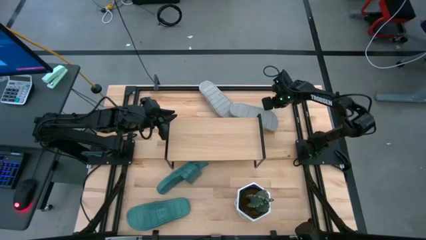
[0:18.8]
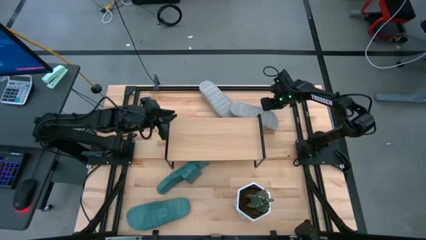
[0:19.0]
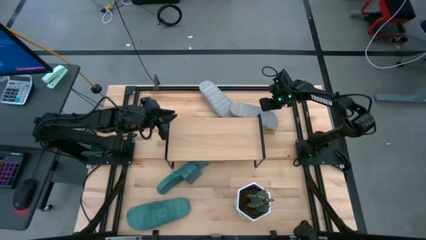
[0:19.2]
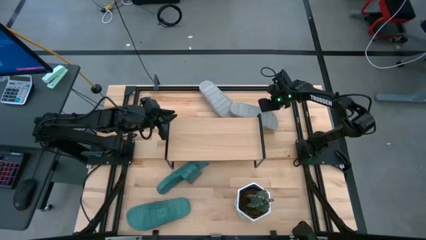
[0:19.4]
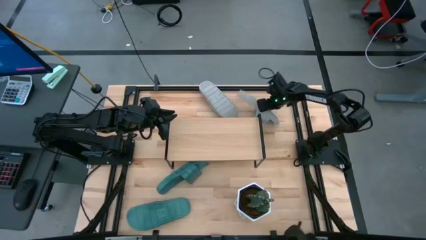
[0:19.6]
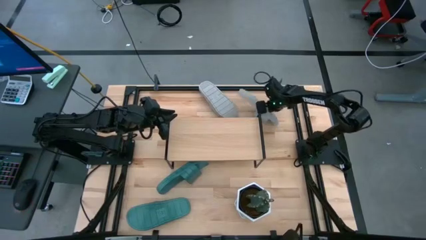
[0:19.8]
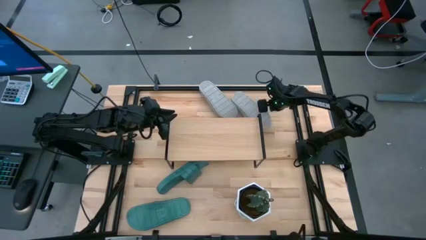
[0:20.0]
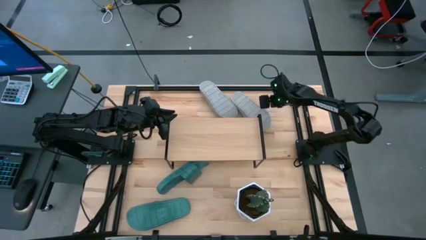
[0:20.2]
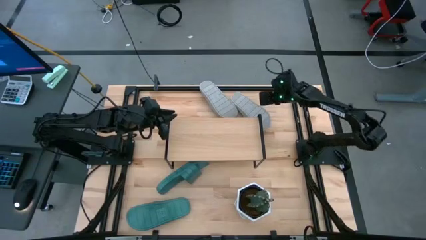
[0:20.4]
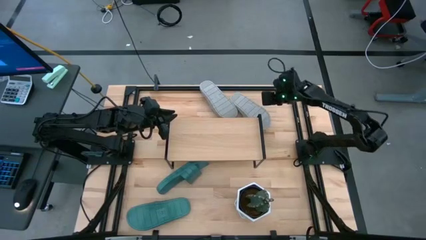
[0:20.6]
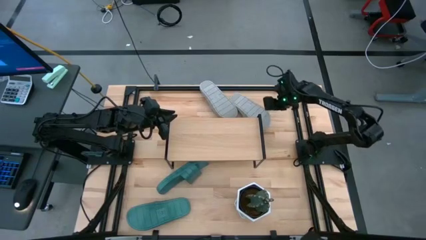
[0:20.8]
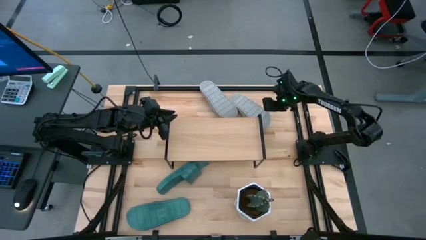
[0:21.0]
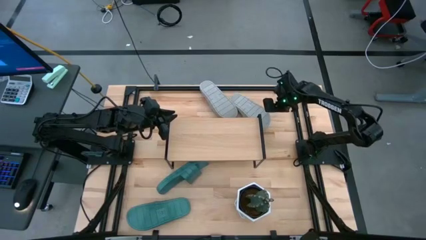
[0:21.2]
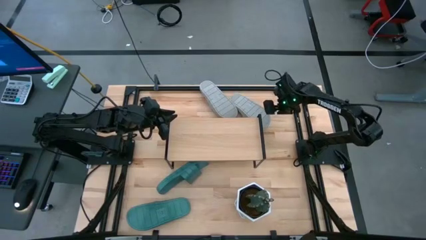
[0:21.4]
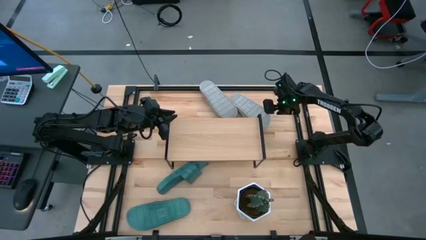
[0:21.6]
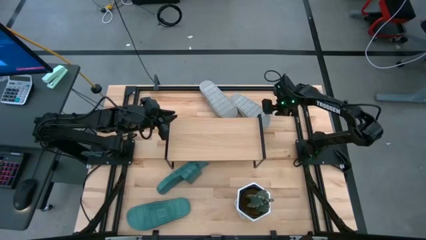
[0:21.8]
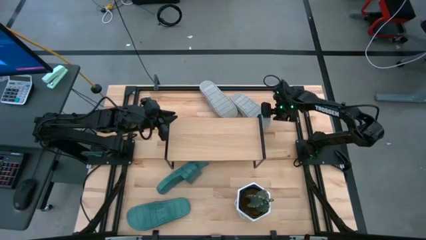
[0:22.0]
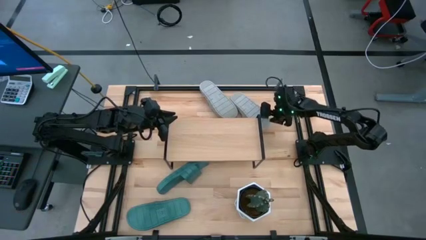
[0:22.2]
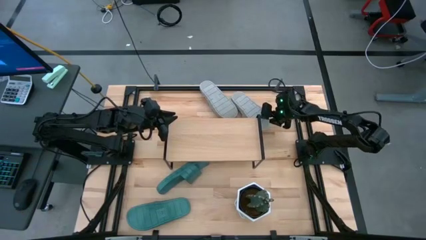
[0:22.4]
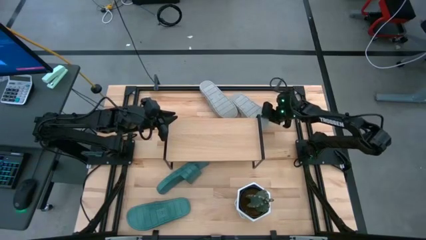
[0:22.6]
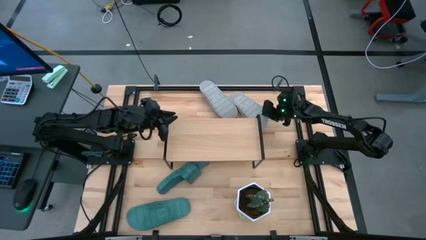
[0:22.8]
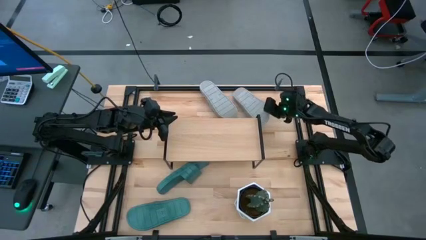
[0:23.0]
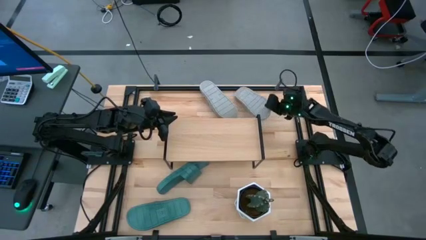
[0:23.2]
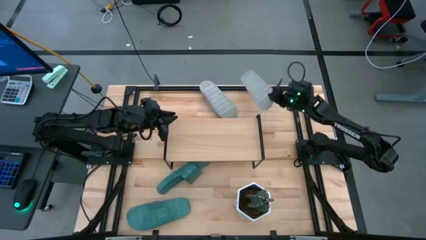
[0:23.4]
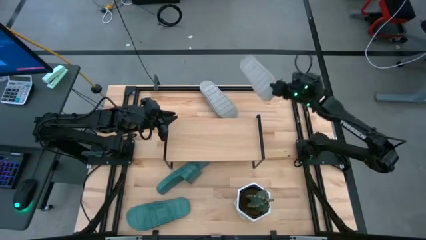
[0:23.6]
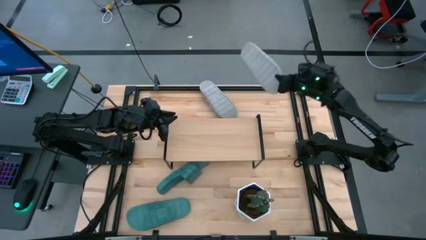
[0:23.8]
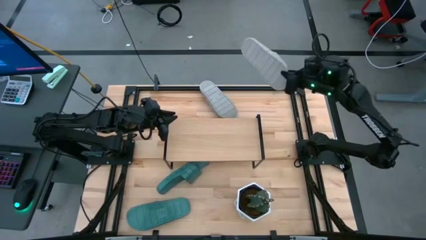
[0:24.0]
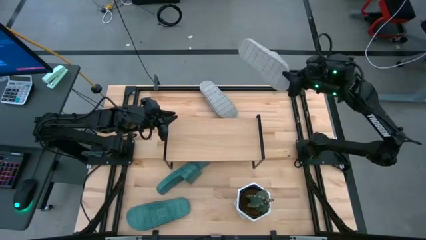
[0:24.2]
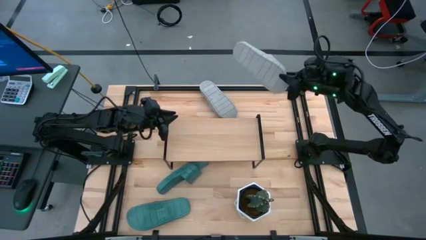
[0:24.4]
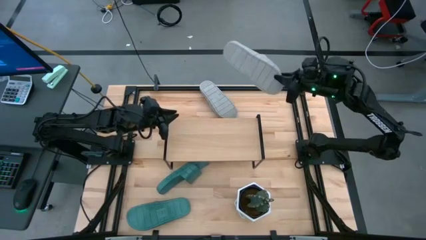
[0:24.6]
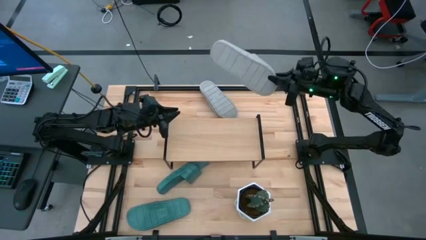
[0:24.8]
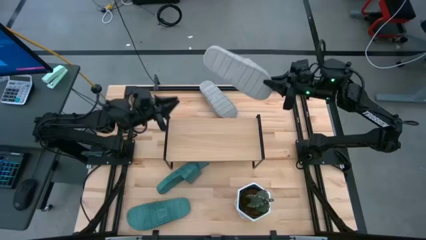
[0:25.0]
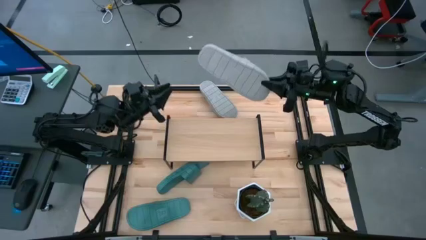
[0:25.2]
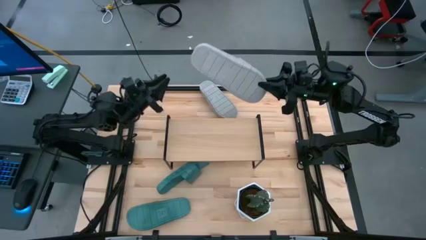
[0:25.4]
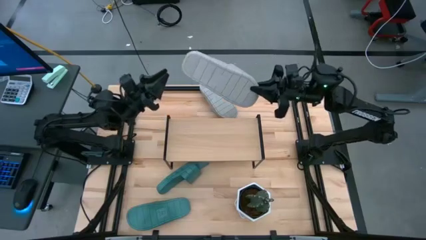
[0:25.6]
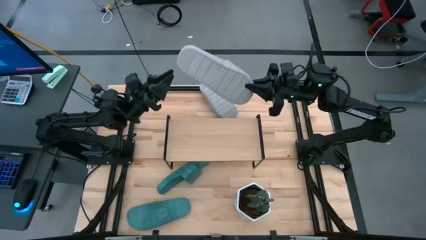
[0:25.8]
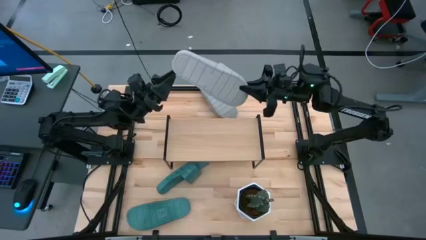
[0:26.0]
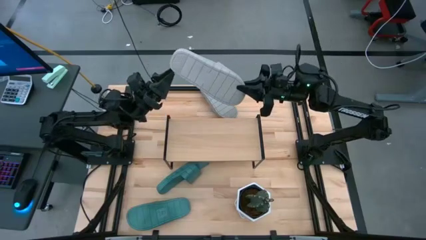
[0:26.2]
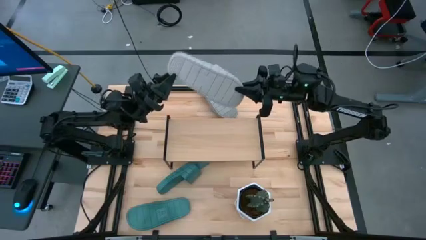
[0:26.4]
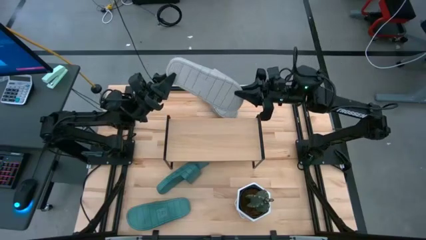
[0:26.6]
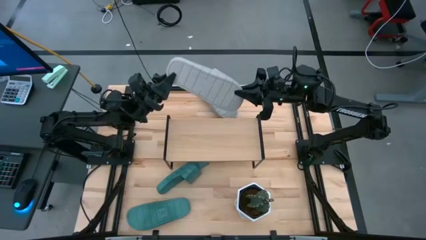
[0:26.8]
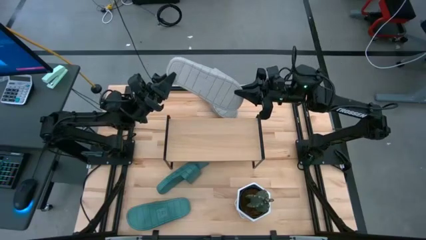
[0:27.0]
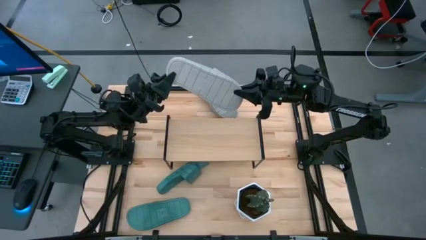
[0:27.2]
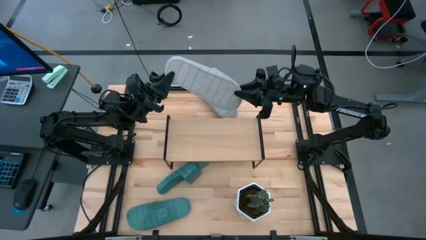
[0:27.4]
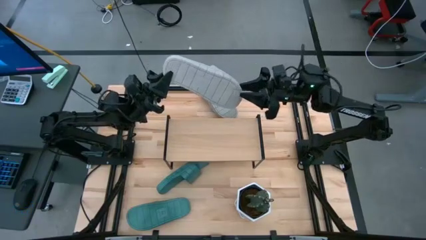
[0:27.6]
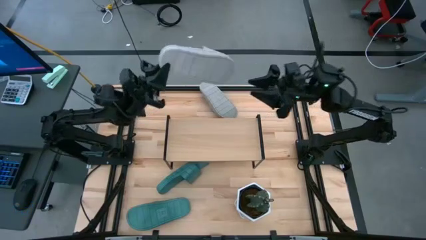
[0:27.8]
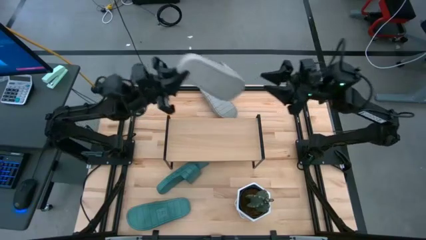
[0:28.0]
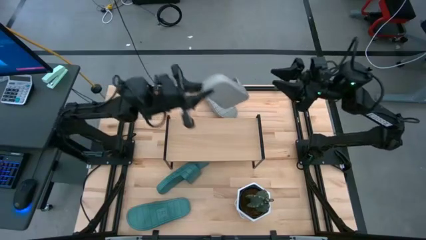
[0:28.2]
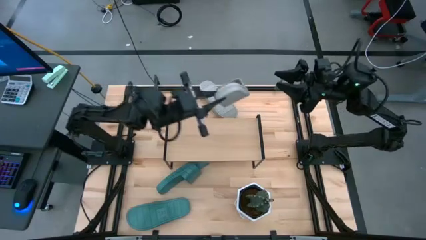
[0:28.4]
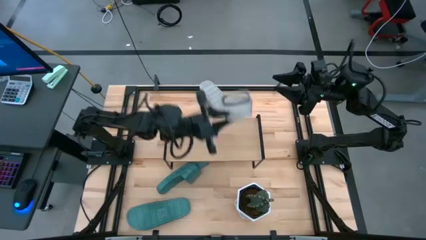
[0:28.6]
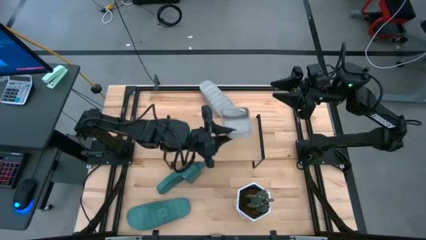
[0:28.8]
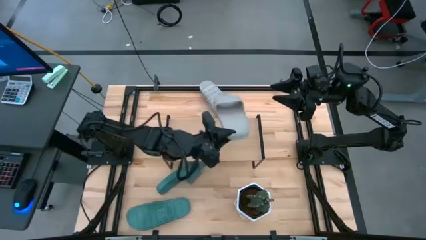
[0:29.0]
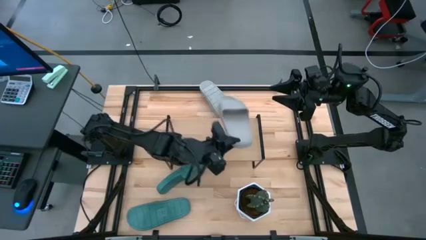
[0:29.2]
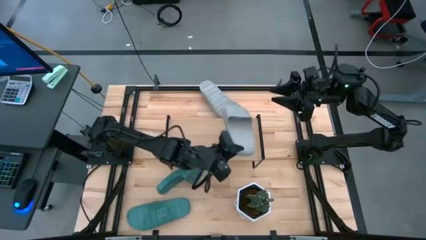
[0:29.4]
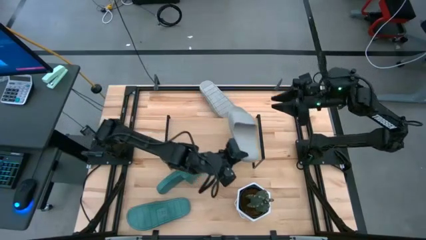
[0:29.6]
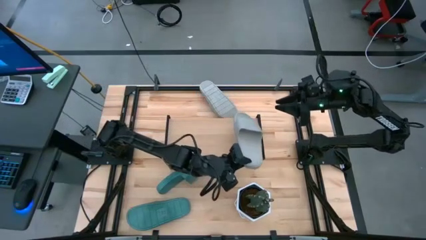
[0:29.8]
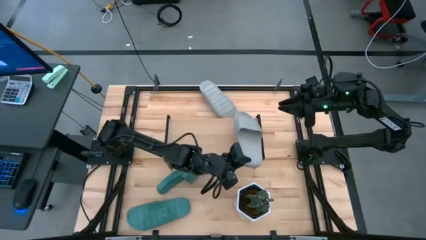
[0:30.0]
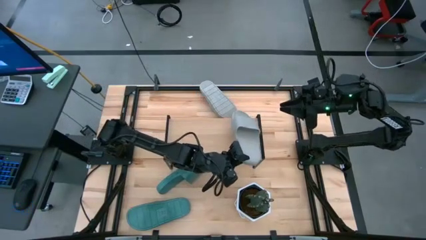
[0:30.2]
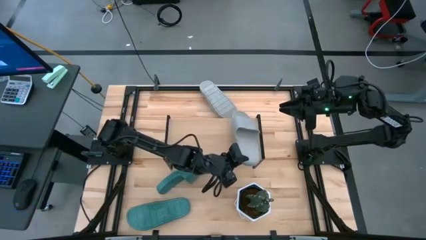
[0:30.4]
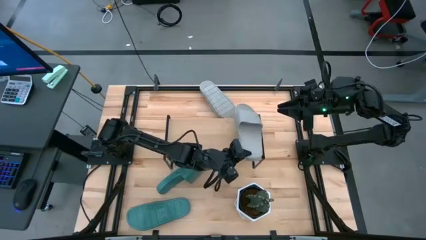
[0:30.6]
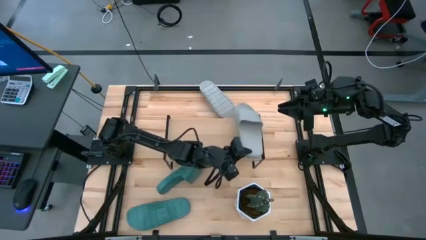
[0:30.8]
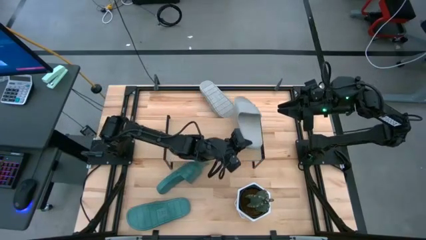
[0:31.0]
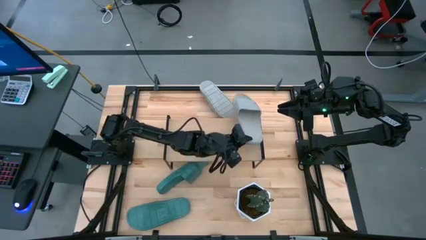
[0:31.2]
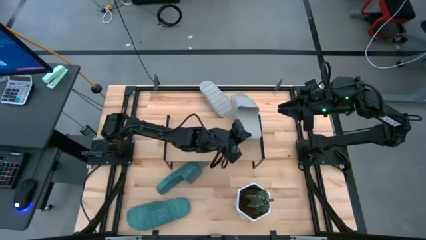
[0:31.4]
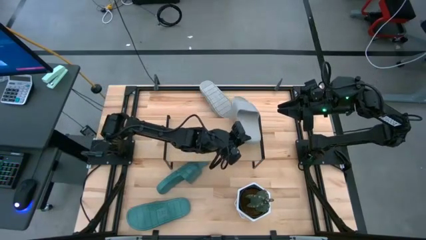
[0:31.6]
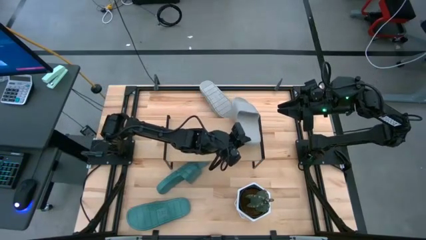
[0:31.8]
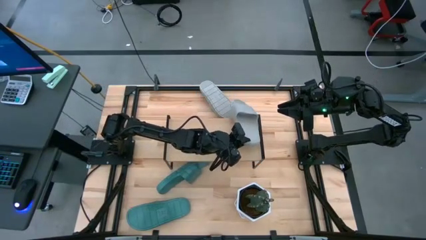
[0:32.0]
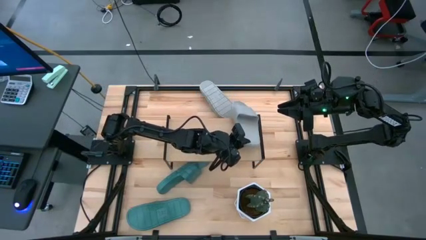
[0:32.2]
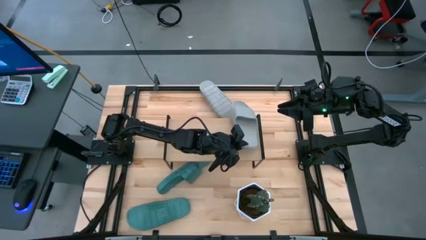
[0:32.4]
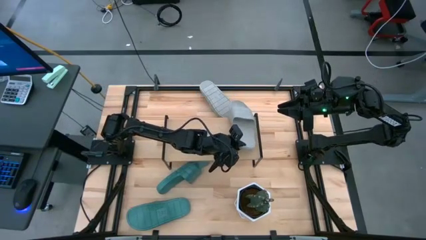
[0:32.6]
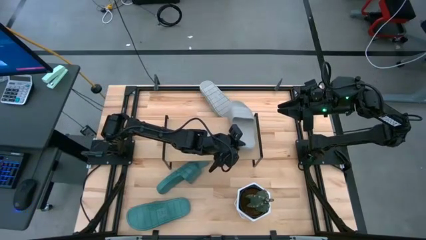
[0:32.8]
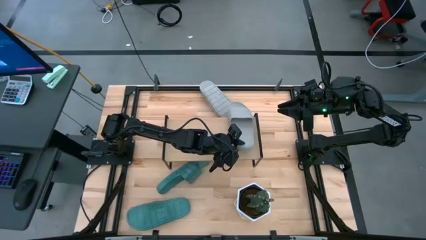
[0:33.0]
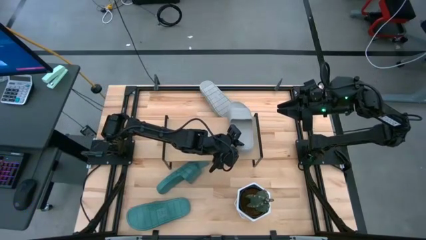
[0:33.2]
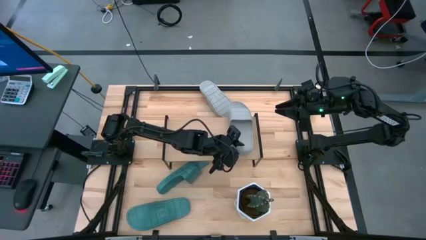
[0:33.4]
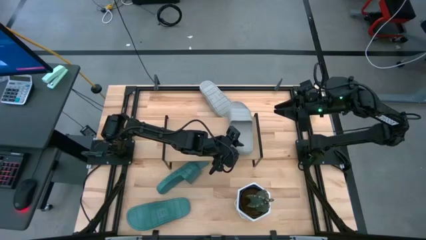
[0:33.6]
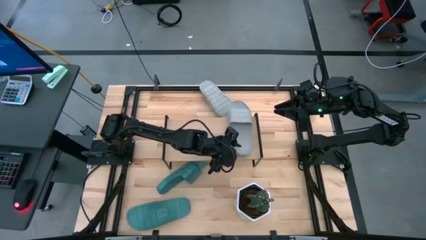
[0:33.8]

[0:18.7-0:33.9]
Task: Pick and place slides into the shelf
Put the right gray slide on the shelf
